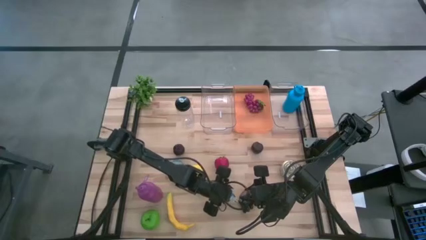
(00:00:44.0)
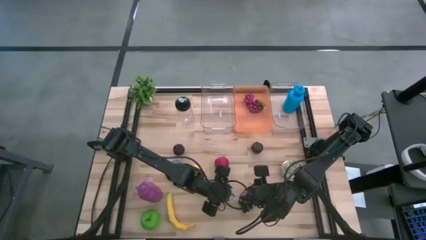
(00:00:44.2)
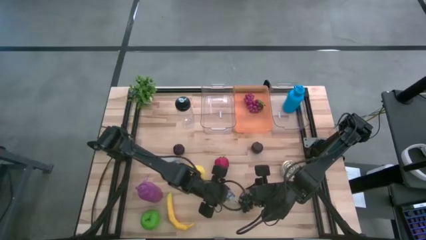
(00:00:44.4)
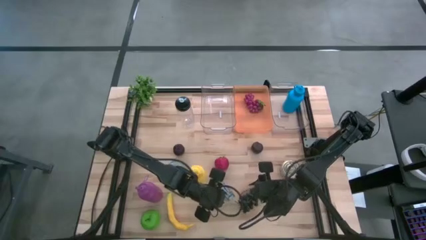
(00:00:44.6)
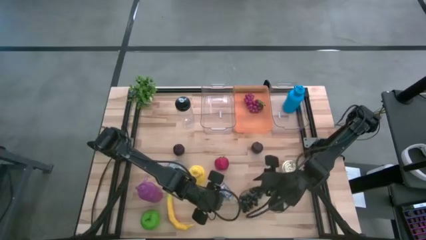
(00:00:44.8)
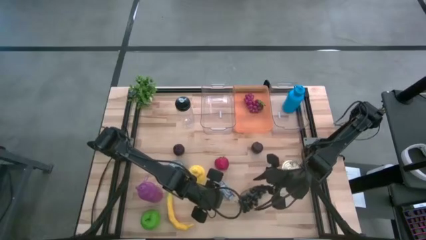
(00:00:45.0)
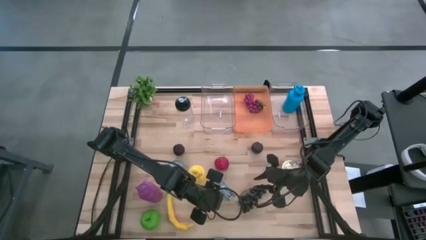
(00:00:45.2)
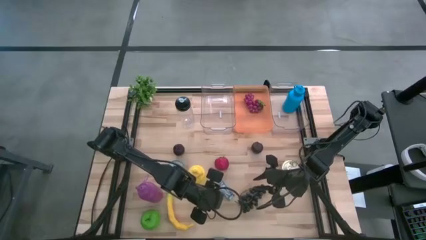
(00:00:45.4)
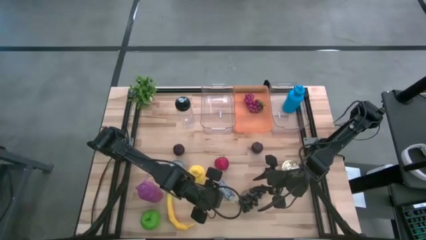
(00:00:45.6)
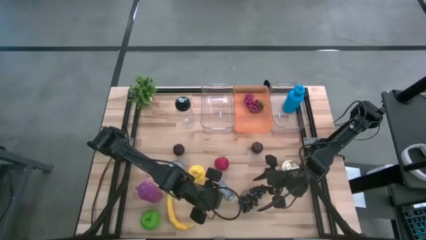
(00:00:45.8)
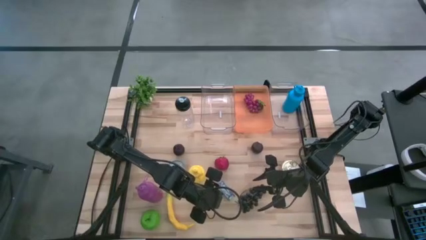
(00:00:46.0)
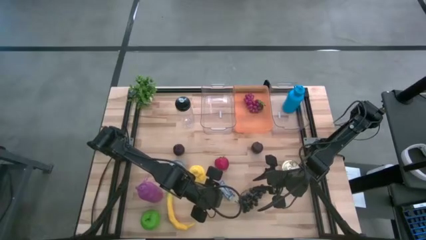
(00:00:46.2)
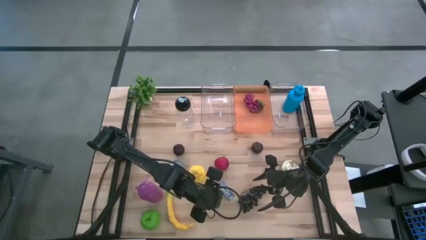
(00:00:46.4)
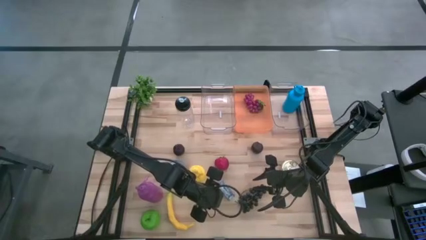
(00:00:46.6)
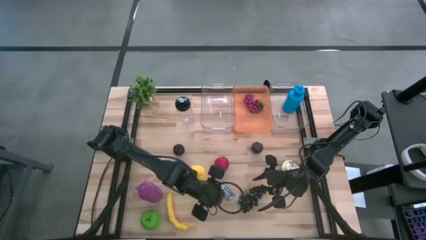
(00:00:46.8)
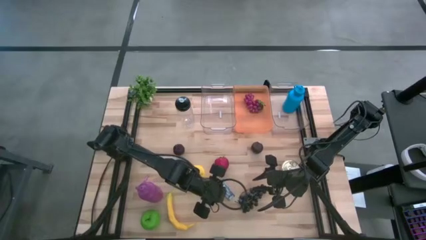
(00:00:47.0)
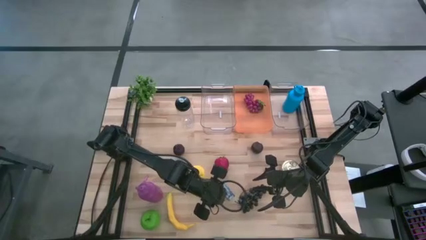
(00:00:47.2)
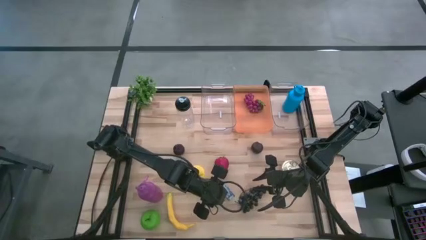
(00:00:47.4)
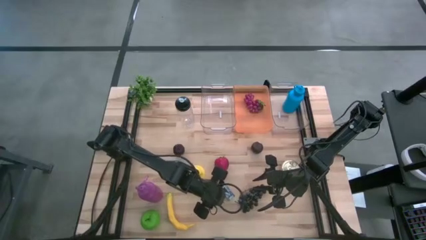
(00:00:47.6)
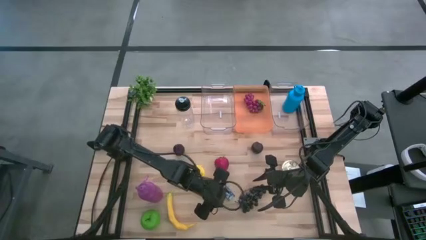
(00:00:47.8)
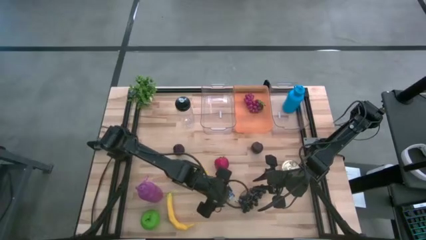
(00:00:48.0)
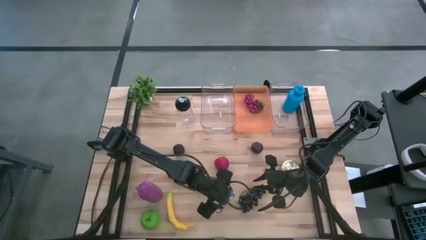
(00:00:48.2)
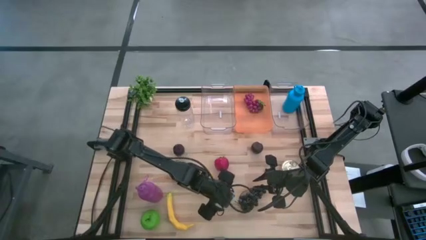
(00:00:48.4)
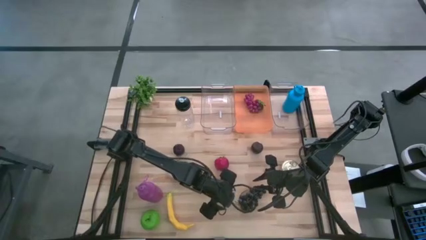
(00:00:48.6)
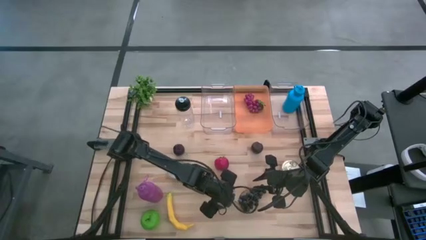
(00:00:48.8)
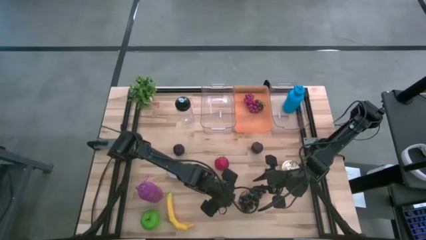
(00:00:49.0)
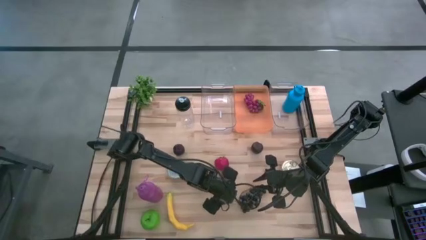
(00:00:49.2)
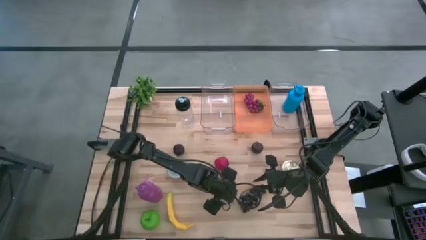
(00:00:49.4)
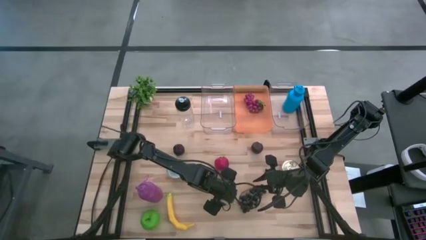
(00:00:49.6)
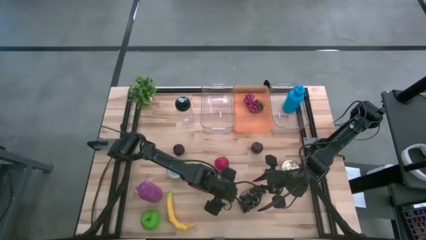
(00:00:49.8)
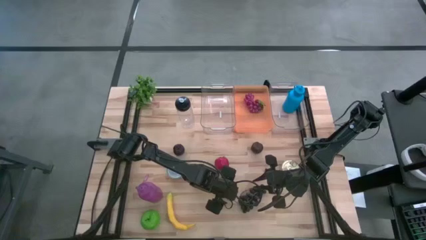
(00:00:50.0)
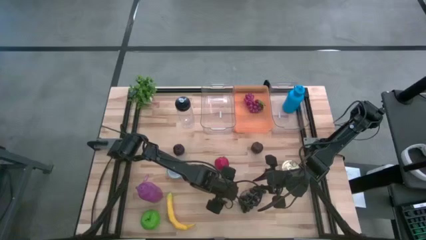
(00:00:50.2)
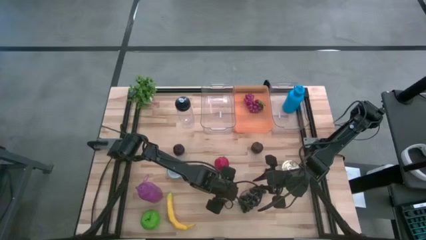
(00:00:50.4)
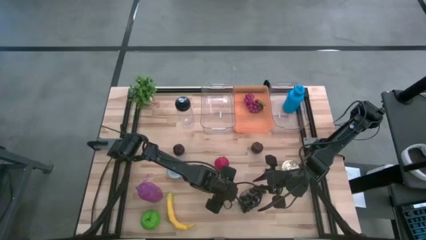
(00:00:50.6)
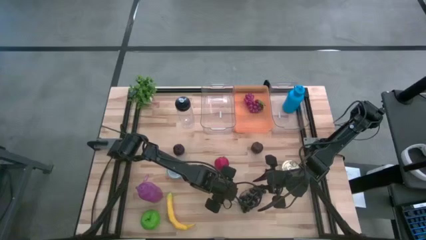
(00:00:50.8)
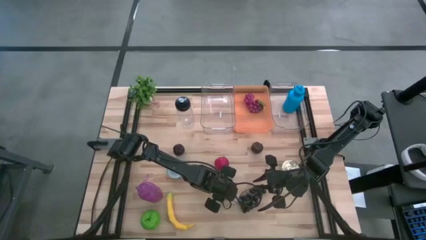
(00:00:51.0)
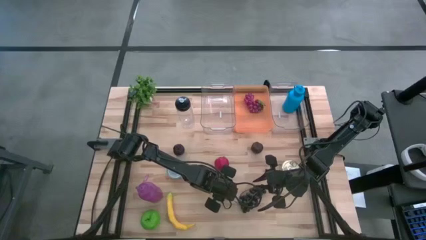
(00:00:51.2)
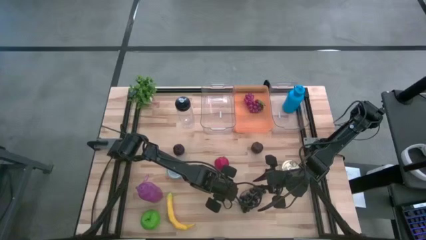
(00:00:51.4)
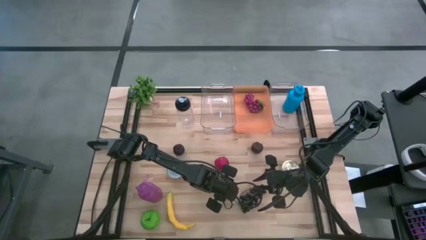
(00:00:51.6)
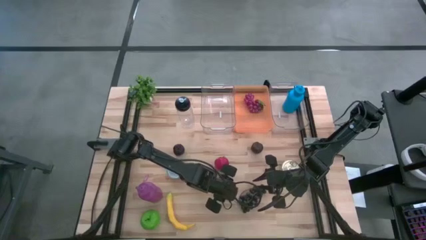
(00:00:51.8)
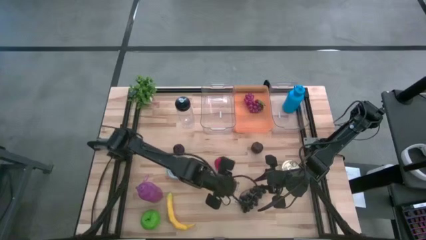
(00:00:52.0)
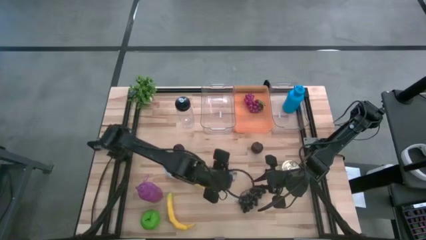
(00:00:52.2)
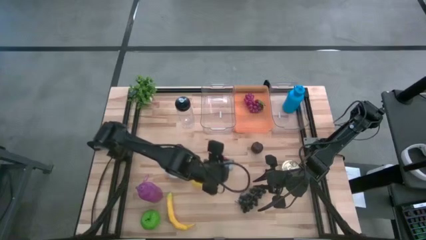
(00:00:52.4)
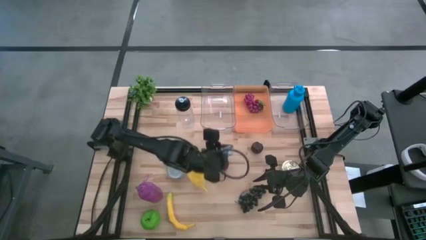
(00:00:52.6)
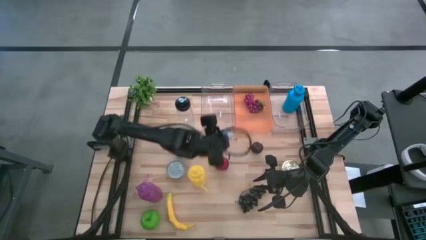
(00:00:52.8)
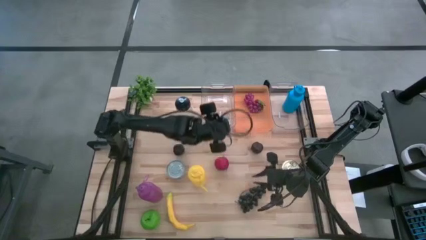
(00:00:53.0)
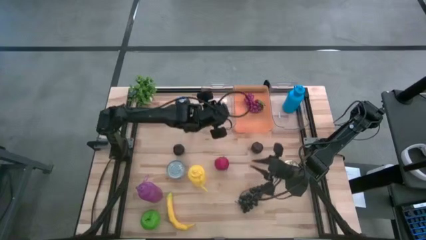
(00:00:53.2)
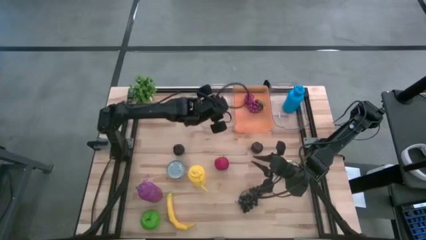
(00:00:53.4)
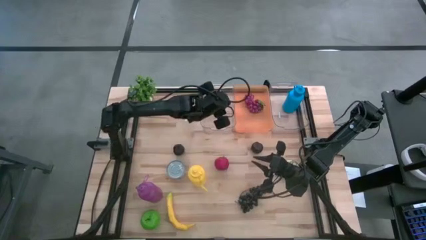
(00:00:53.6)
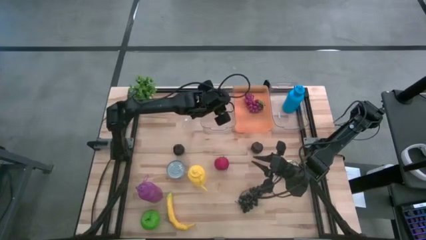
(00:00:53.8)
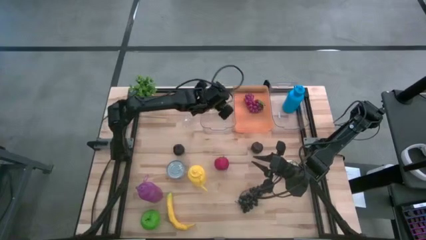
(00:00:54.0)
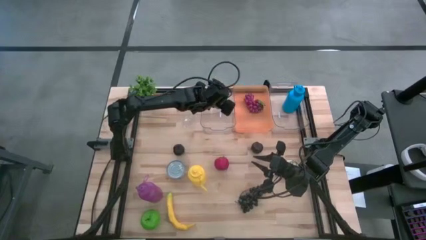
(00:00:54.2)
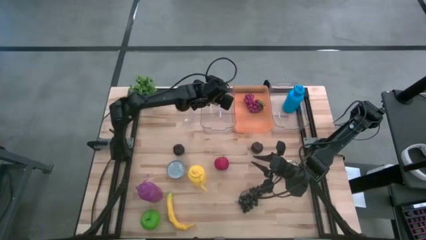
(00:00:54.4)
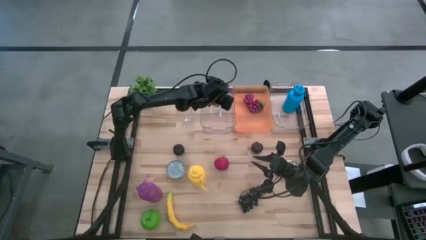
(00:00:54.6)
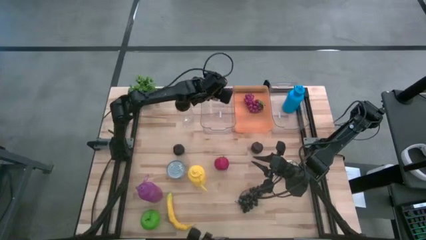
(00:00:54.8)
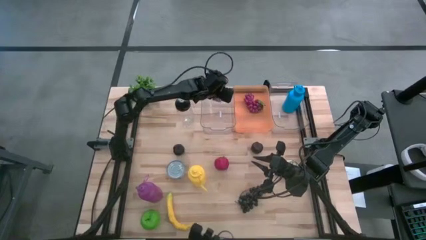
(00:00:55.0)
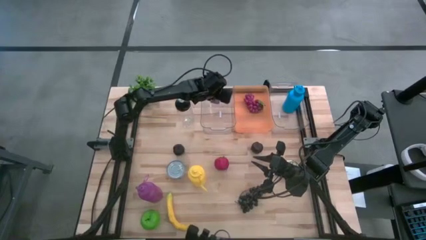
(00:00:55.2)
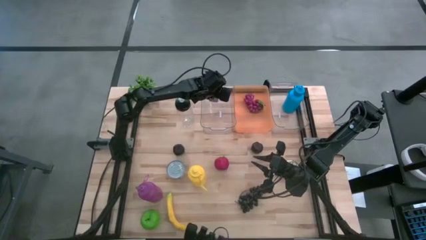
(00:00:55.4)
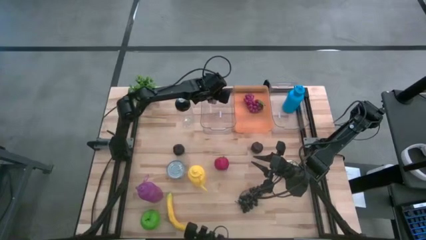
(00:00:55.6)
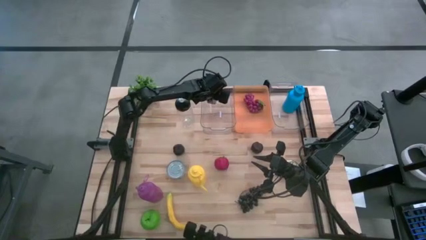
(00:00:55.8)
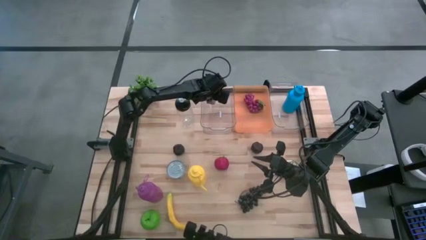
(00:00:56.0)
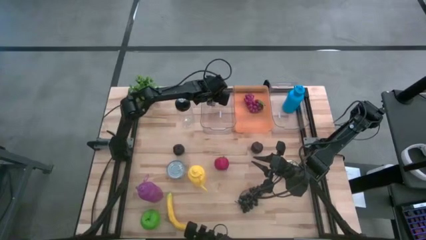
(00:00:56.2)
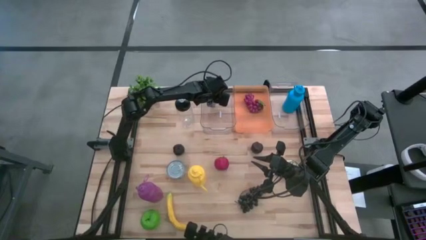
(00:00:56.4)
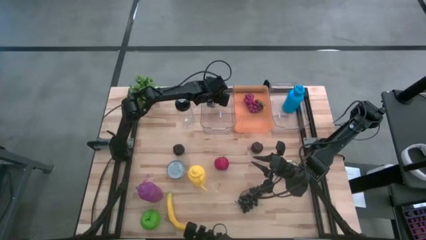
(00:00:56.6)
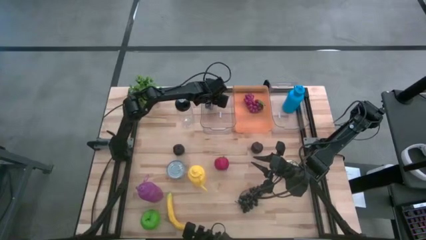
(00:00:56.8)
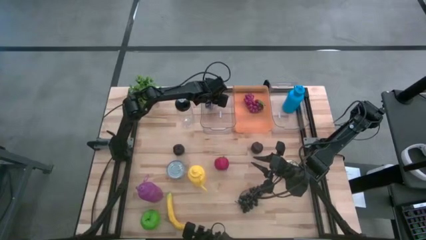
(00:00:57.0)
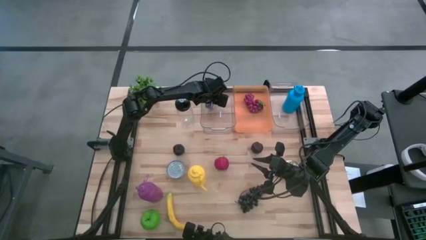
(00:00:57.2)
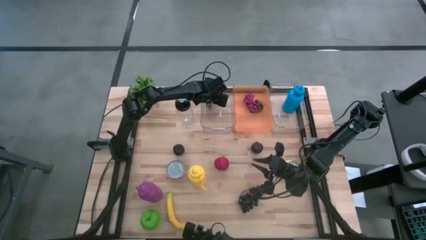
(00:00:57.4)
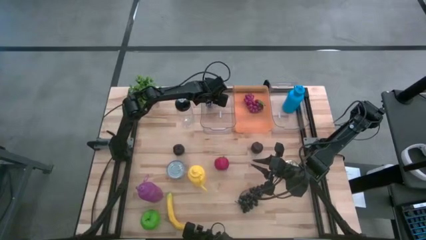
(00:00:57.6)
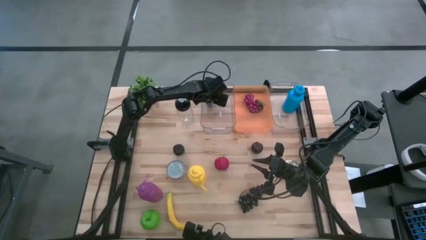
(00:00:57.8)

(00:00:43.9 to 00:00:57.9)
Task: Pick & Place Food Item
Put the blue tuna can into the left transparent bin
